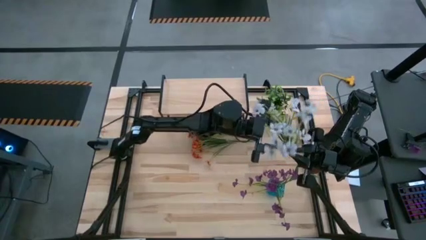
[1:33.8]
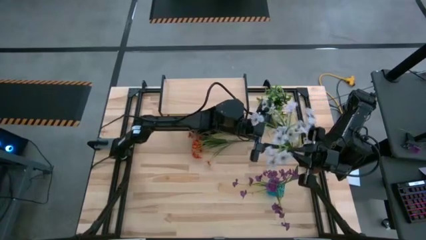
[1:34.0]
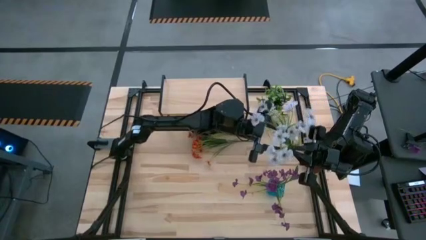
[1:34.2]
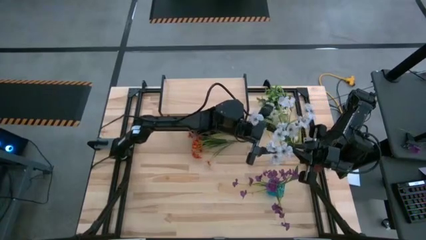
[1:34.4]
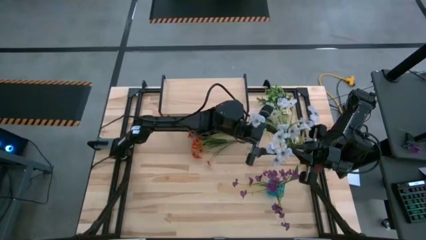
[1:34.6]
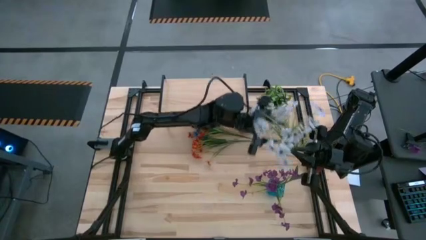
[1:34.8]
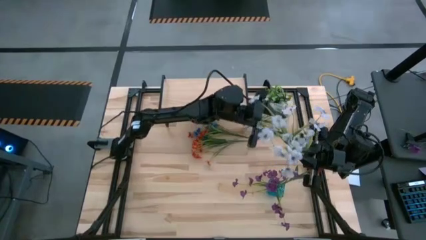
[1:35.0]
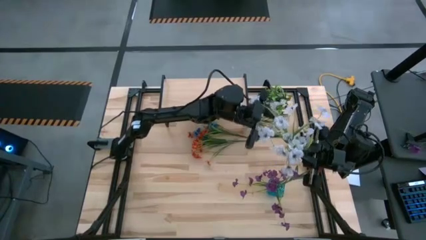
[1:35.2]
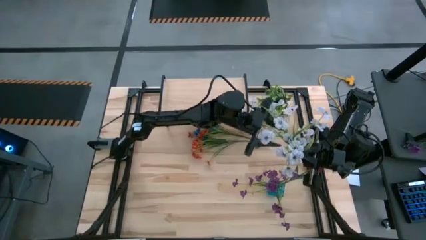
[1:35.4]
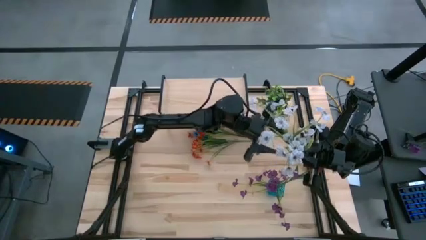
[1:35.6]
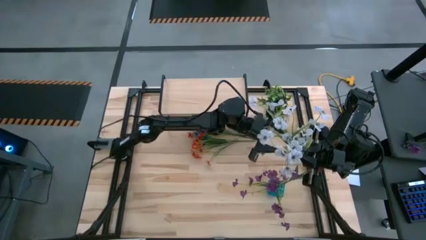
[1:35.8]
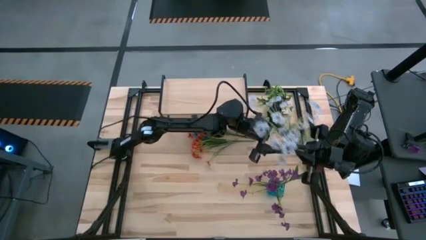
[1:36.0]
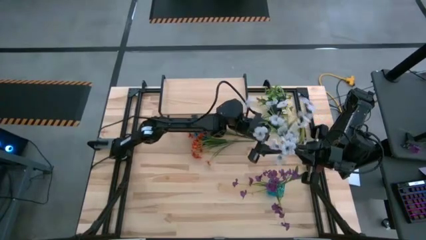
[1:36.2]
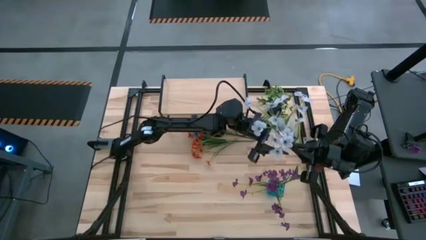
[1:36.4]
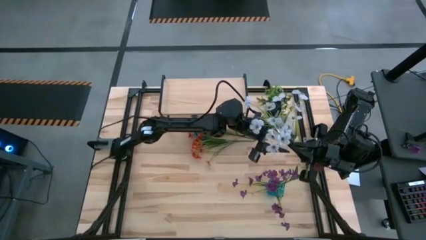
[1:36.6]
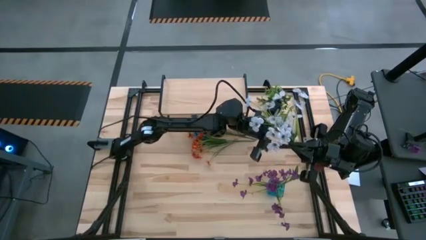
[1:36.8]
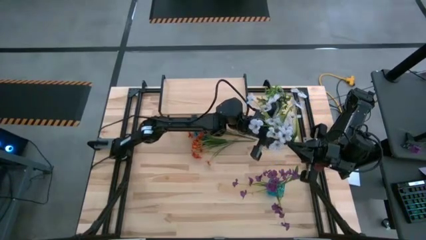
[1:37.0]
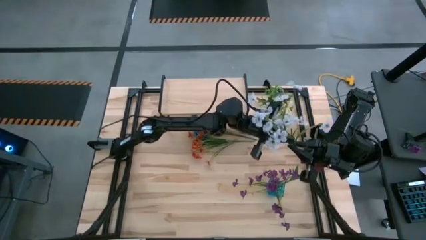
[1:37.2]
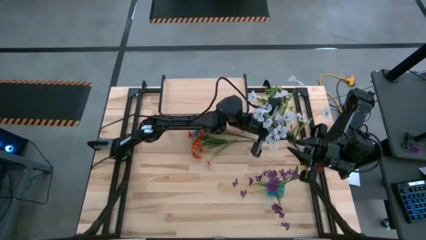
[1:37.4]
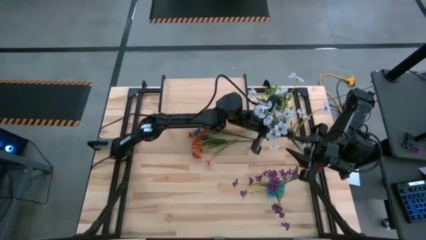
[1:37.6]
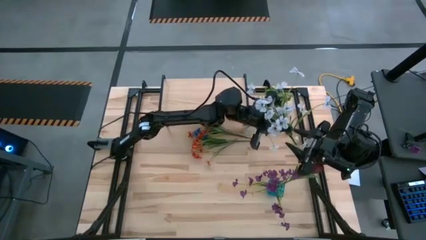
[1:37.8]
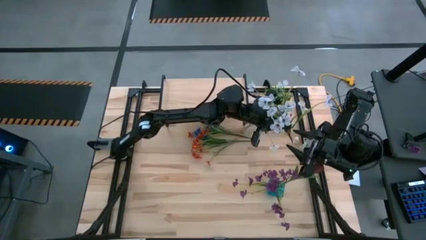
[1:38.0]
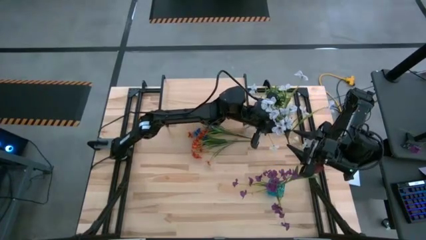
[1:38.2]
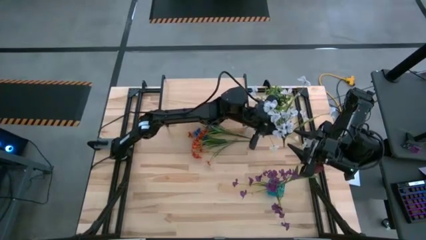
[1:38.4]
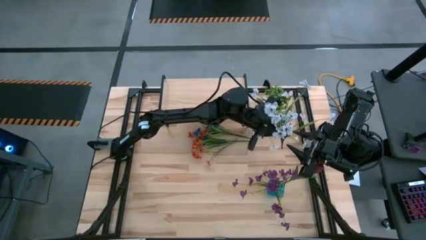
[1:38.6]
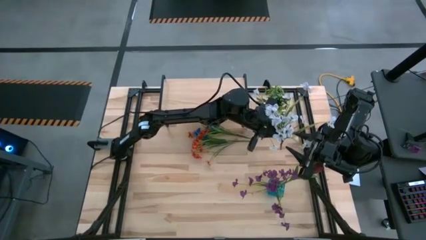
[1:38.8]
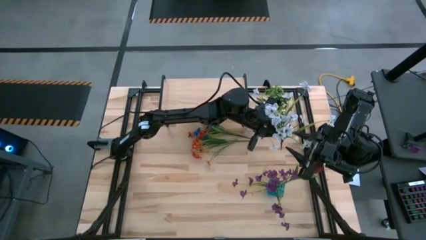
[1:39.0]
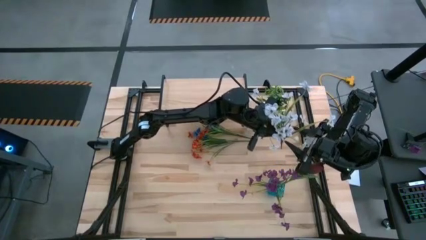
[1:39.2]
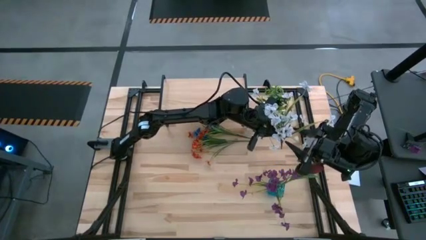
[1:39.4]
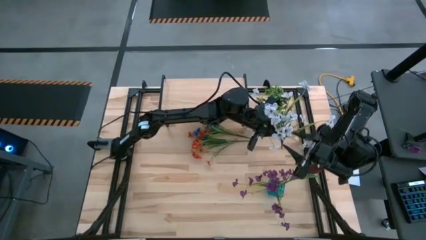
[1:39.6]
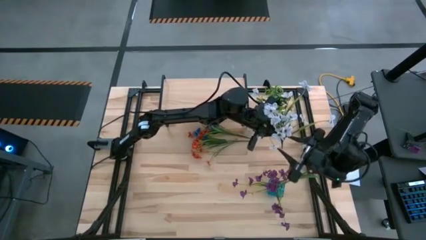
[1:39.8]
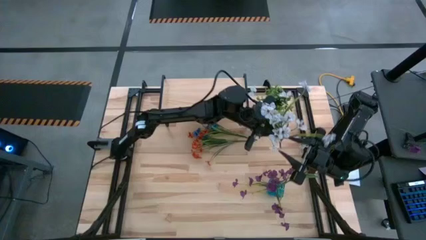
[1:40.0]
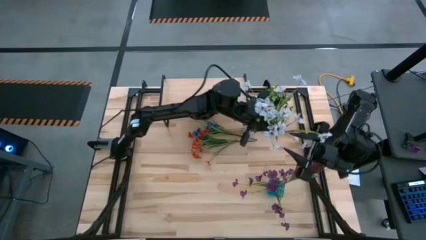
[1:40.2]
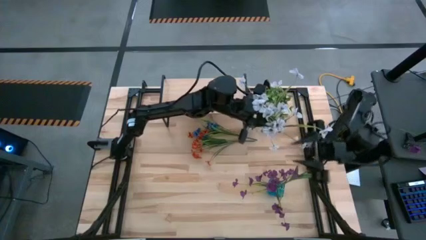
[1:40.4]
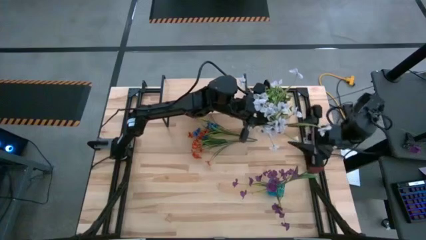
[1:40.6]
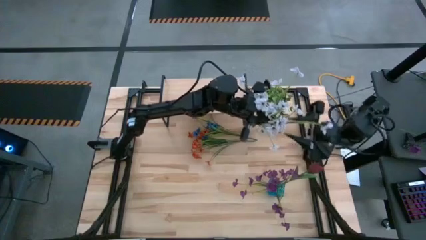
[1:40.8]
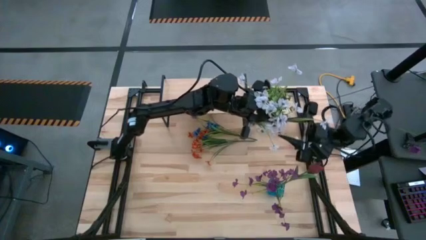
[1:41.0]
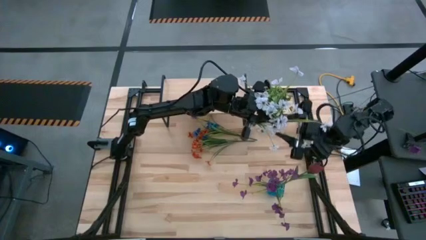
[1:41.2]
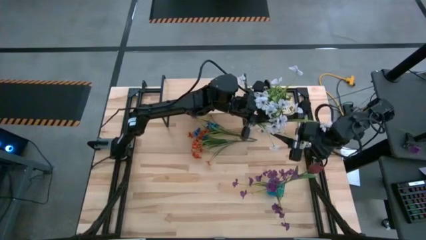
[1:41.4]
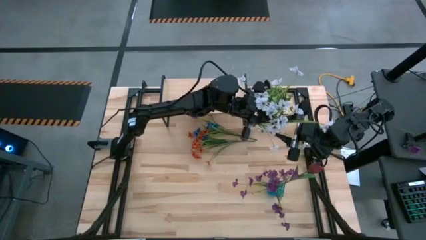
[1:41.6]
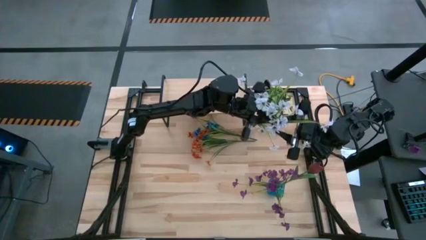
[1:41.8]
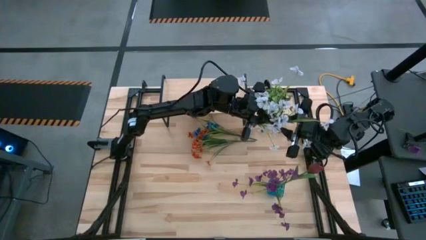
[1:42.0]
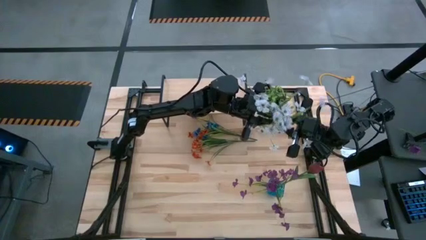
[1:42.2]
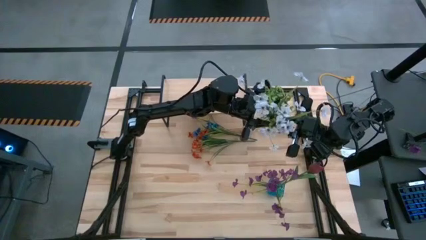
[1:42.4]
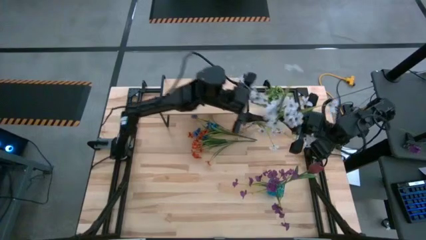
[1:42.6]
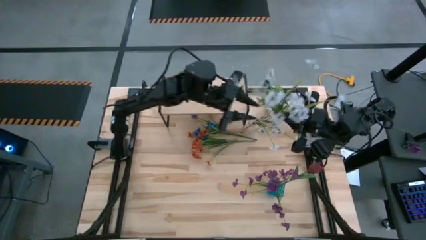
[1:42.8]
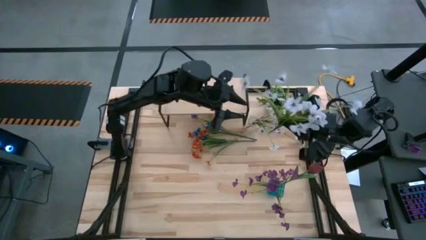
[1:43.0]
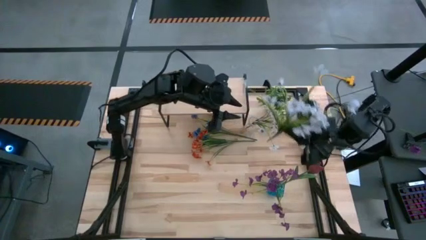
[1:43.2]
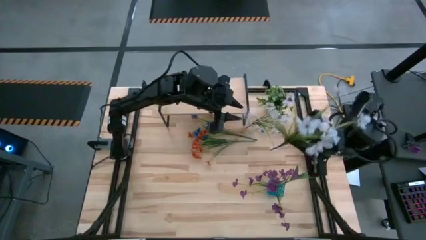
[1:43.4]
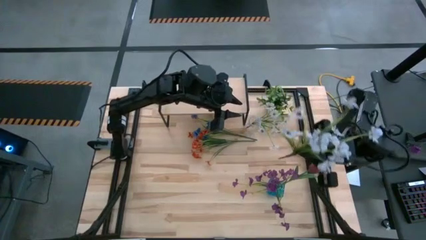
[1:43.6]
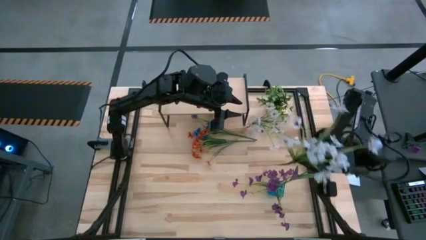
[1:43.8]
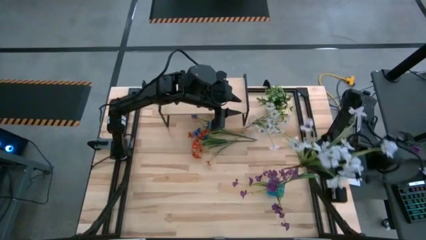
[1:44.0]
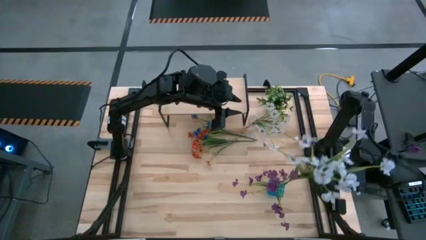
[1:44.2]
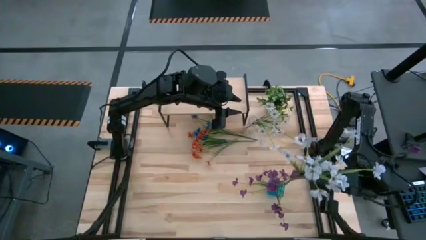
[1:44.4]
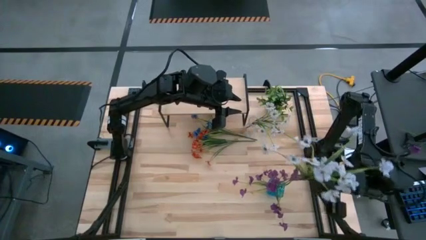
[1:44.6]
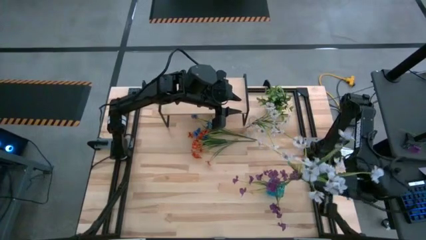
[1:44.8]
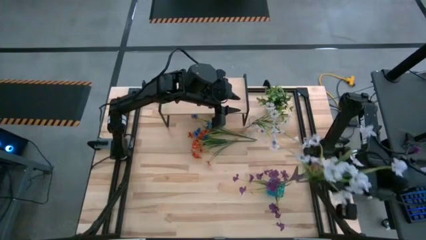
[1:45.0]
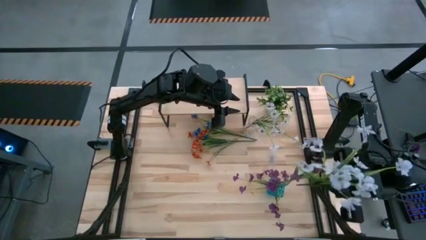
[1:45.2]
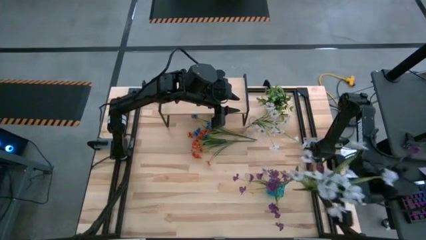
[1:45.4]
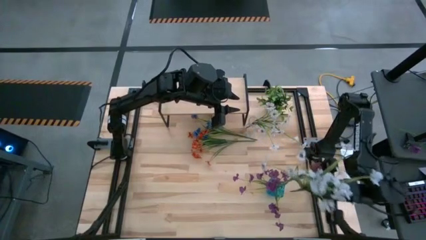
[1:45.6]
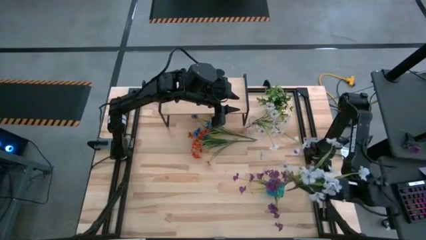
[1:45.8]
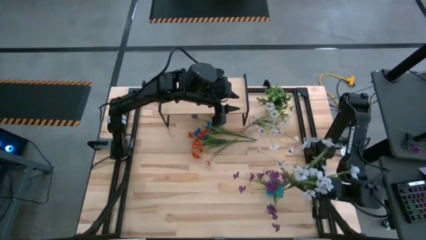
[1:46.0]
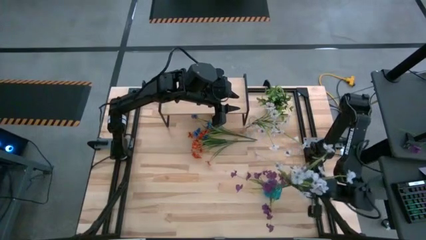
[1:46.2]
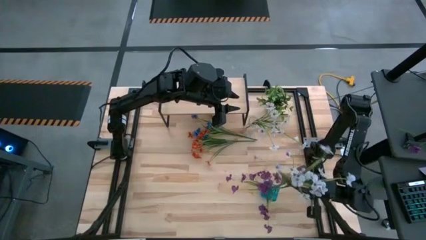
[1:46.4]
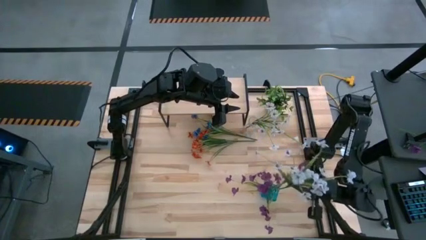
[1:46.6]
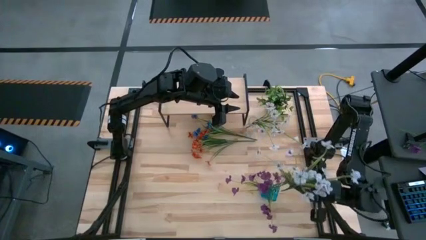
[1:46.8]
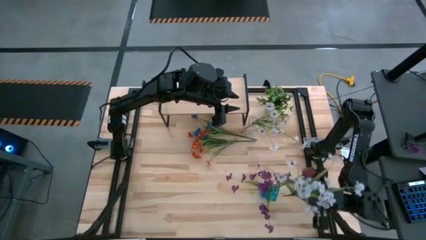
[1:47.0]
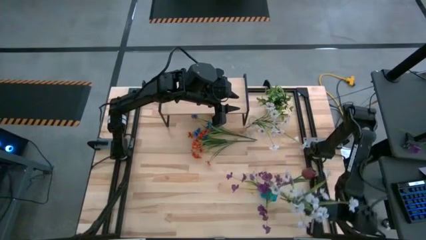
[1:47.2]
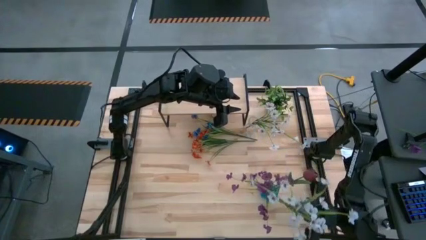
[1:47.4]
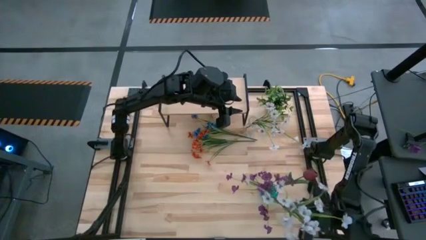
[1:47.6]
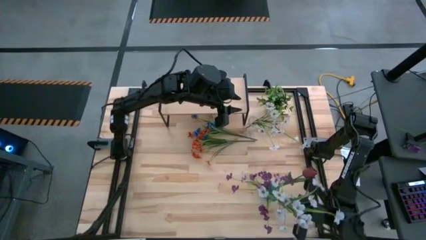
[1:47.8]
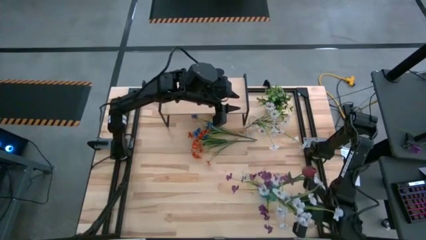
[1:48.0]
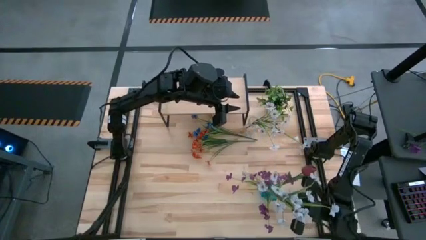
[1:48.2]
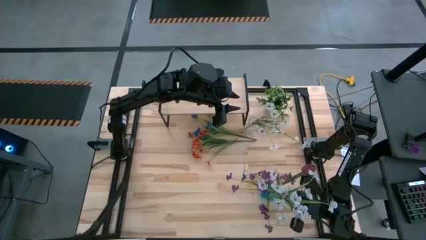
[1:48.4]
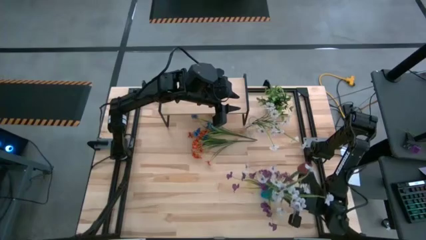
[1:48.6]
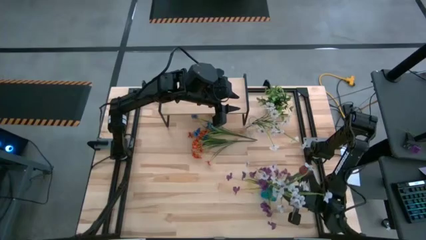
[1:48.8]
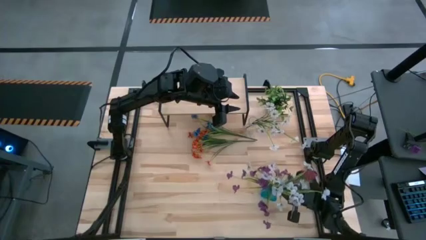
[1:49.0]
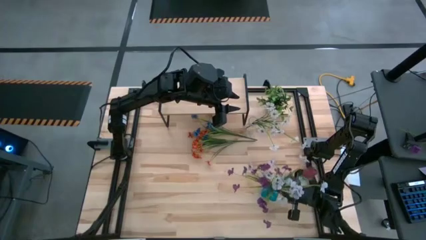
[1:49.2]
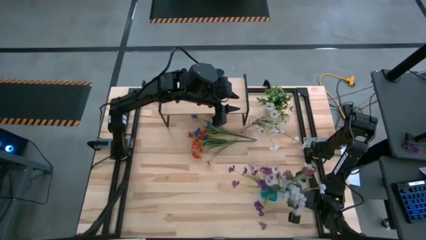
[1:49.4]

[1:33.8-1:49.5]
Task: Pick and place flowers into a vace then onto a shelf
Put the white flowers into the blue flower vase
